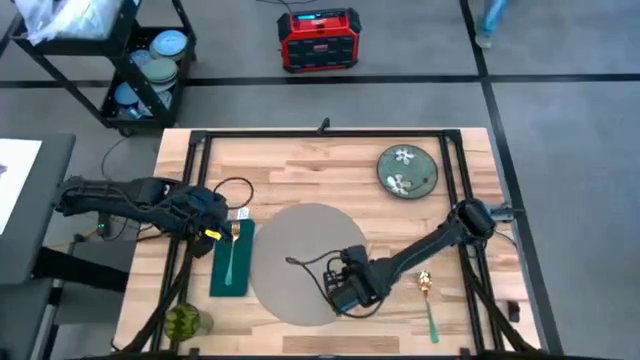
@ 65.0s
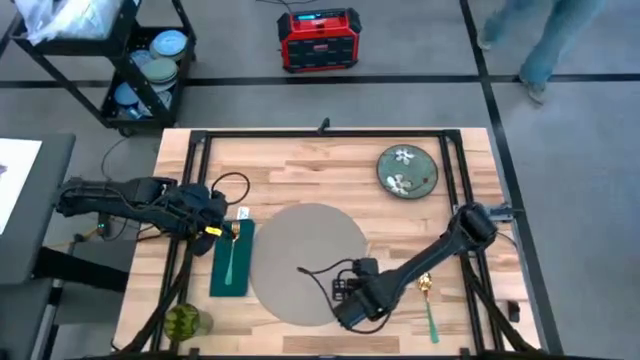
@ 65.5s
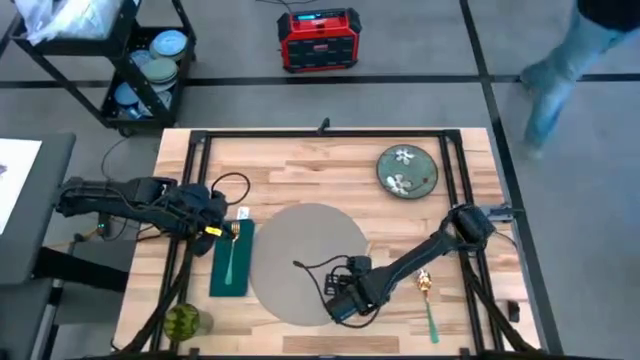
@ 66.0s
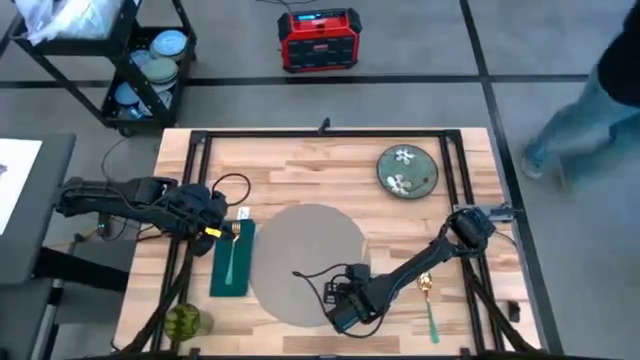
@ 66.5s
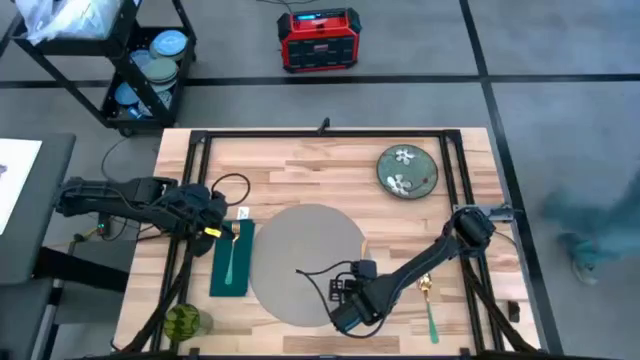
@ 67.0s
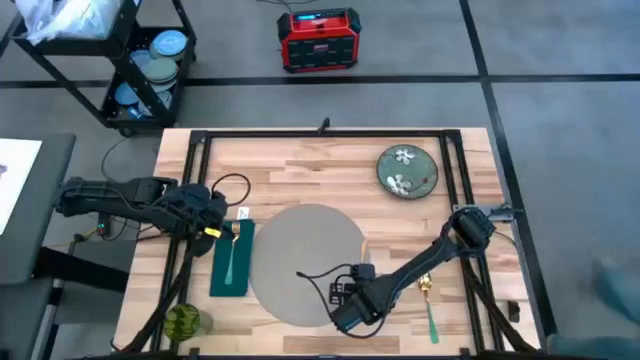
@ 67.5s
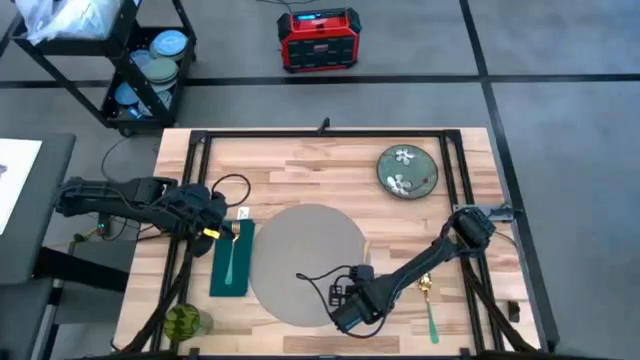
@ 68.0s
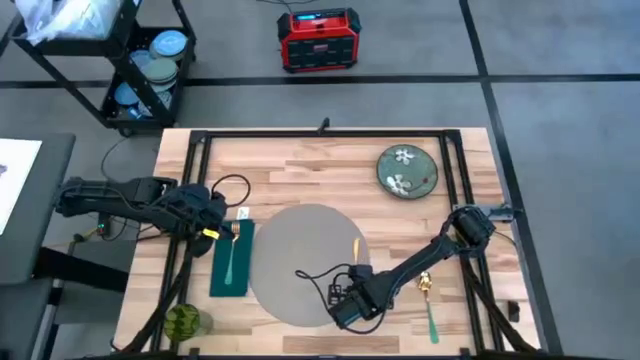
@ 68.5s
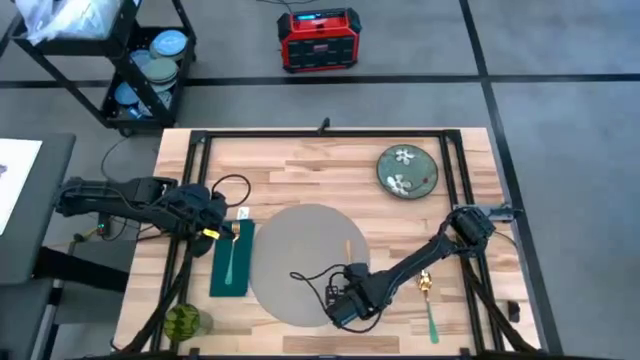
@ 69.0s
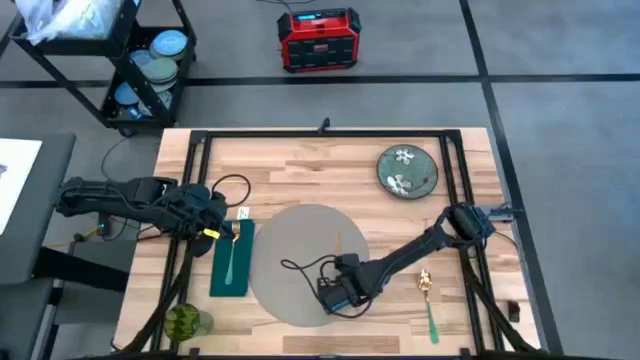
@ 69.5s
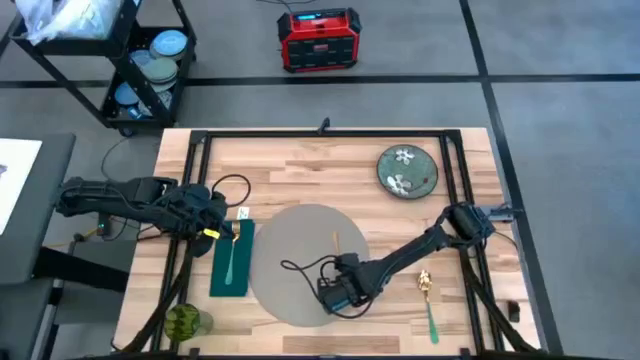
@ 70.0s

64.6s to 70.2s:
Task: Set table place
Put the gold table knife on the gray table placemat

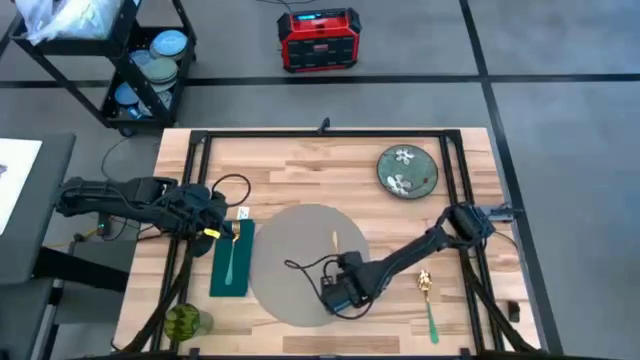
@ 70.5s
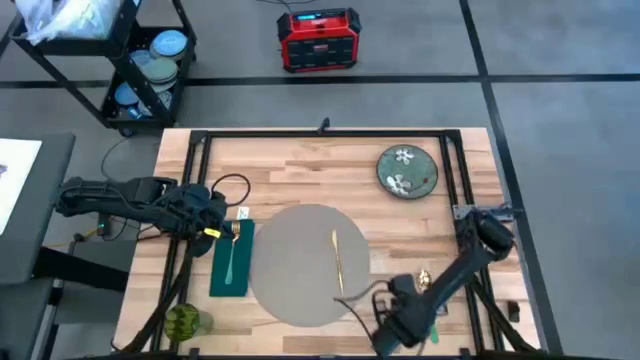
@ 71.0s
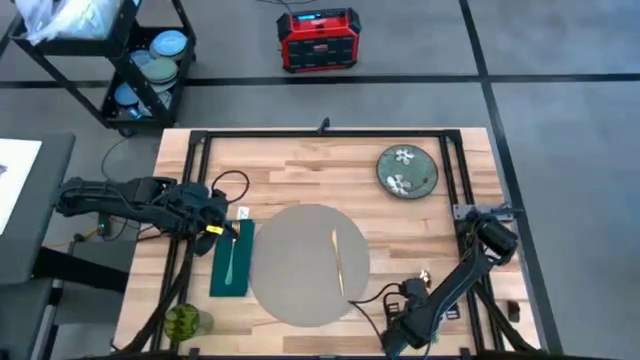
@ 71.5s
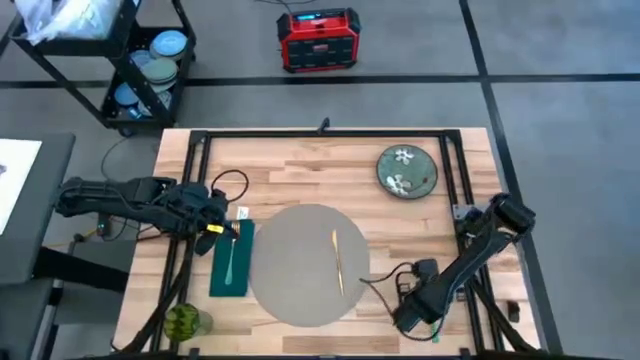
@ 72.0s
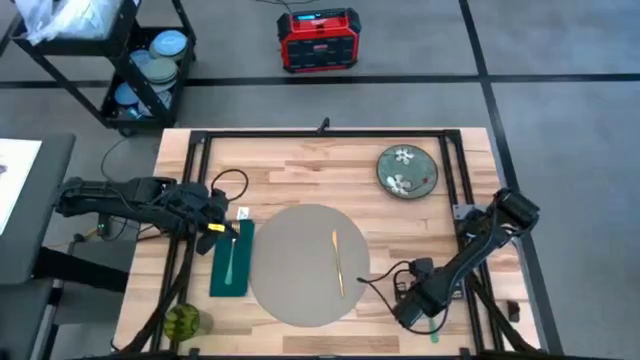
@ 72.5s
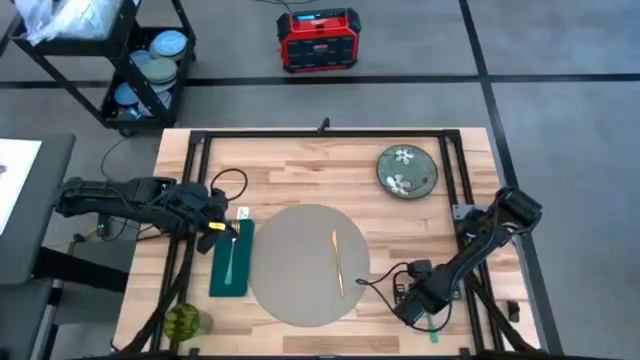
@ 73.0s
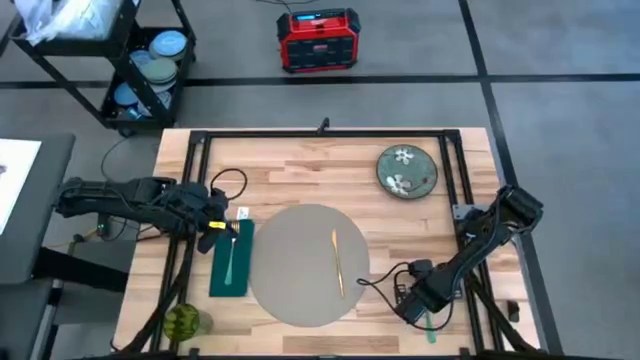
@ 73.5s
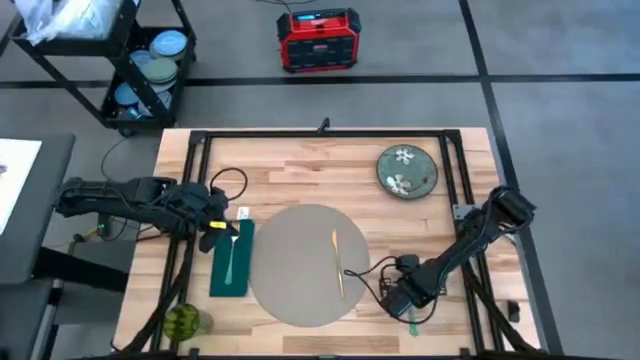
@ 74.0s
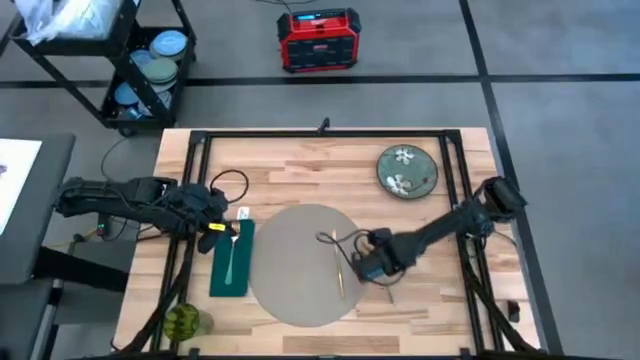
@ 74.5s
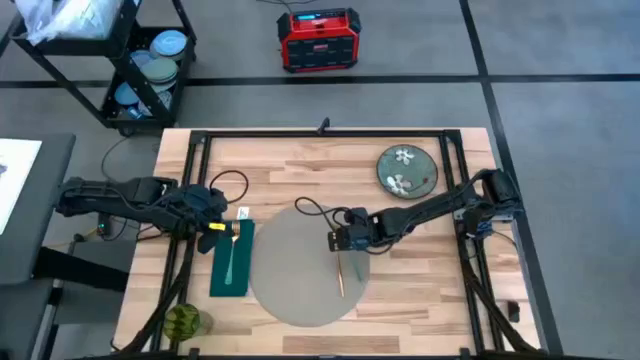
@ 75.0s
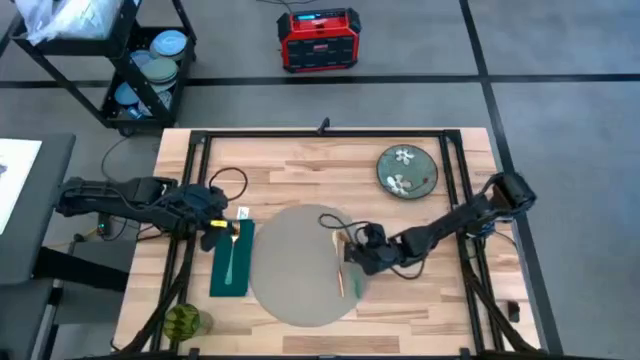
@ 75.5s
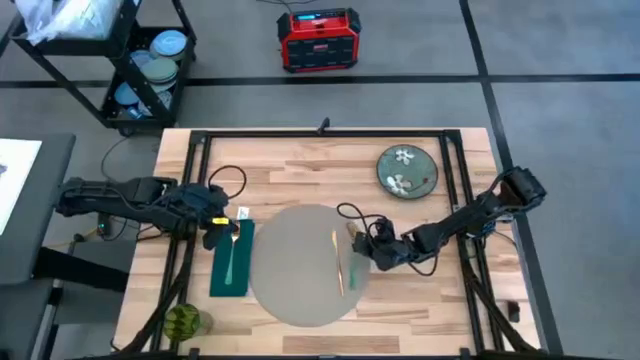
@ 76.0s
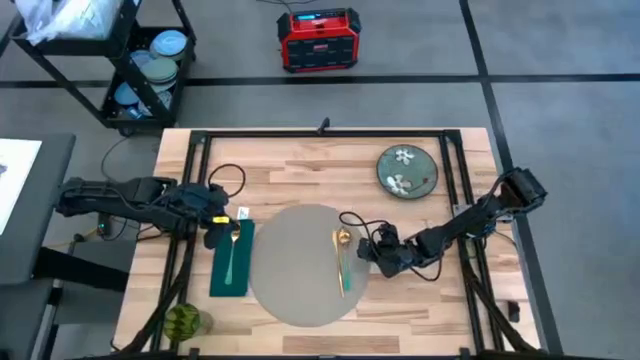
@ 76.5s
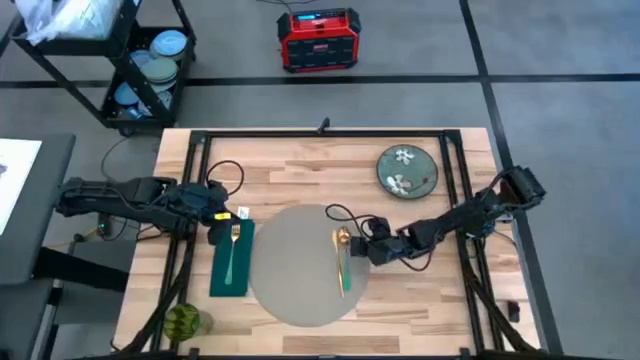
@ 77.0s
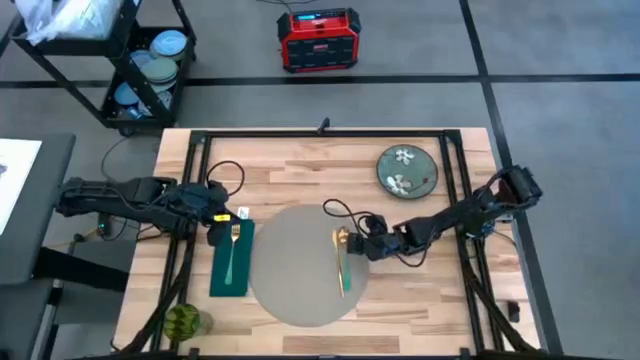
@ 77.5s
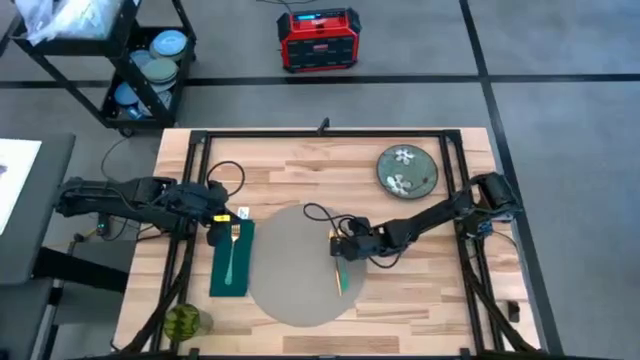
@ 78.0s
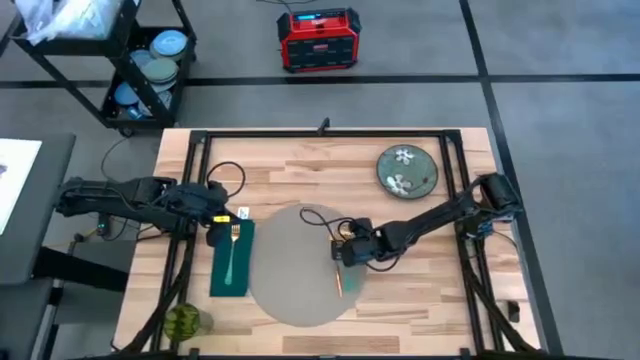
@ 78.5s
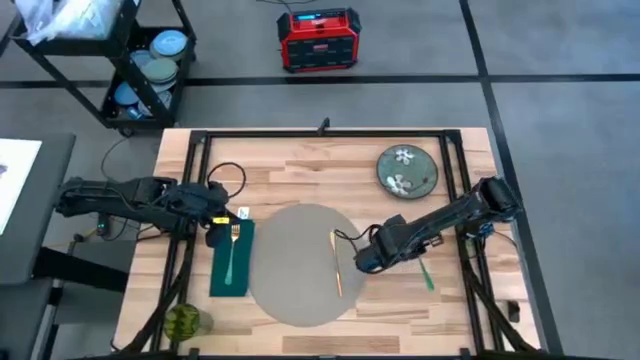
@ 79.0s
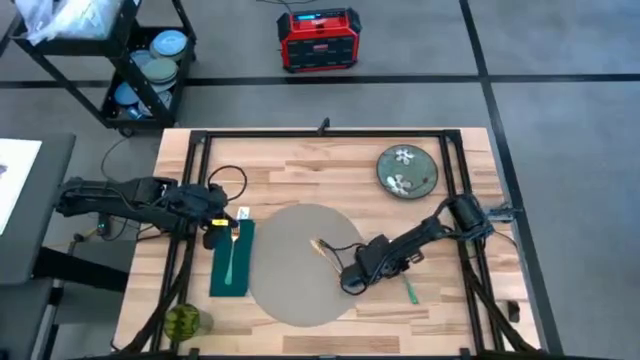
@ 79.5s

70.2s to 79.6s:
Put the green spoon beside the table knife on the gray table placemat

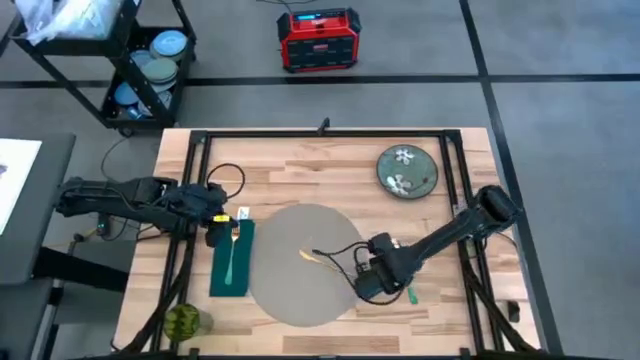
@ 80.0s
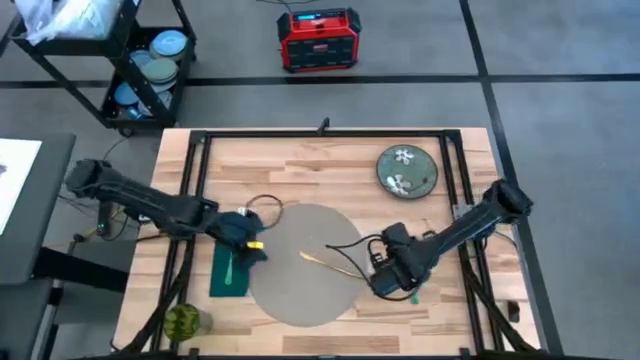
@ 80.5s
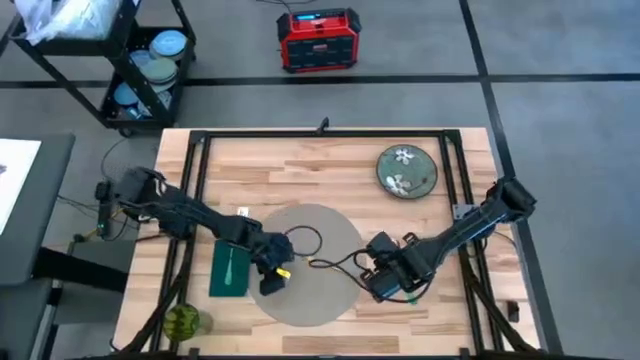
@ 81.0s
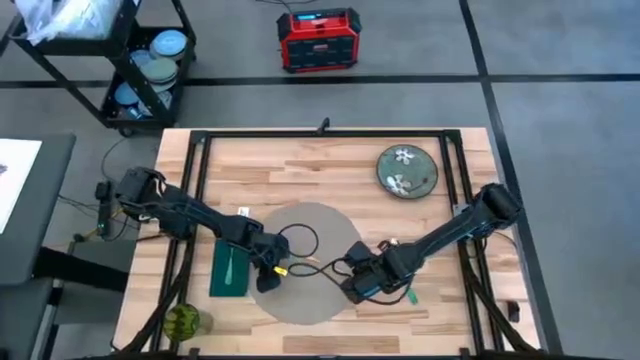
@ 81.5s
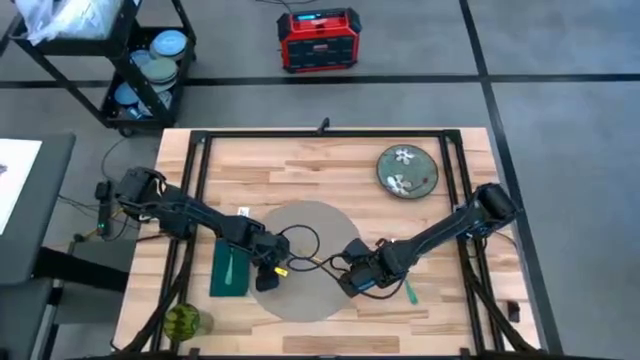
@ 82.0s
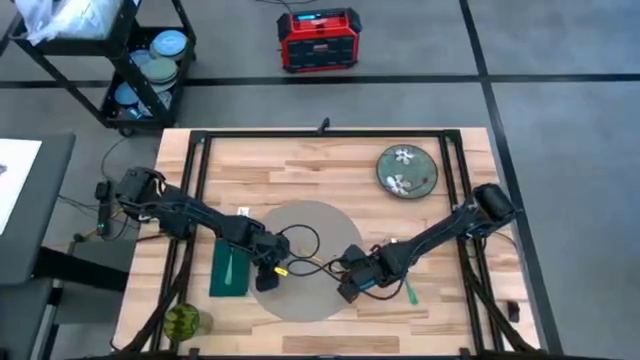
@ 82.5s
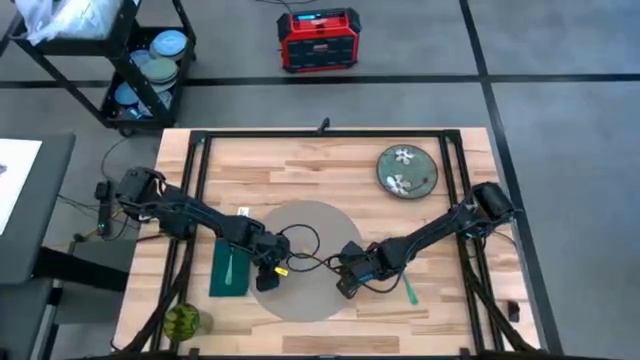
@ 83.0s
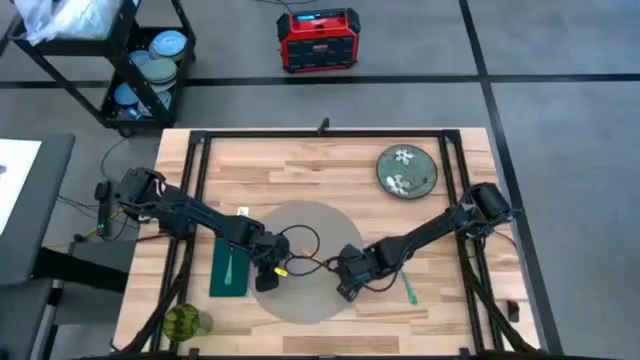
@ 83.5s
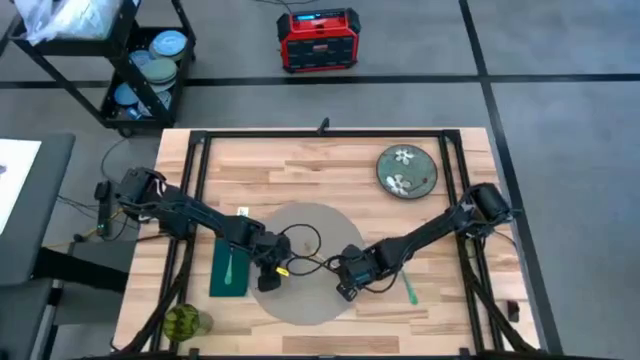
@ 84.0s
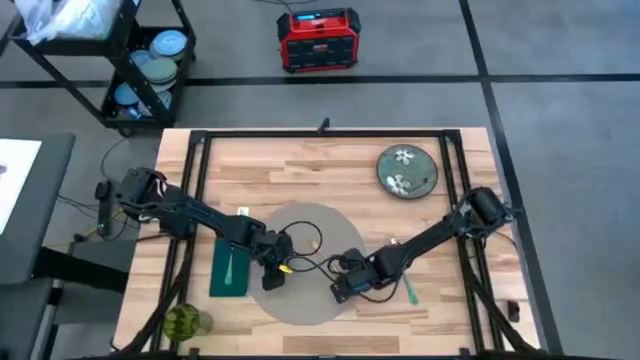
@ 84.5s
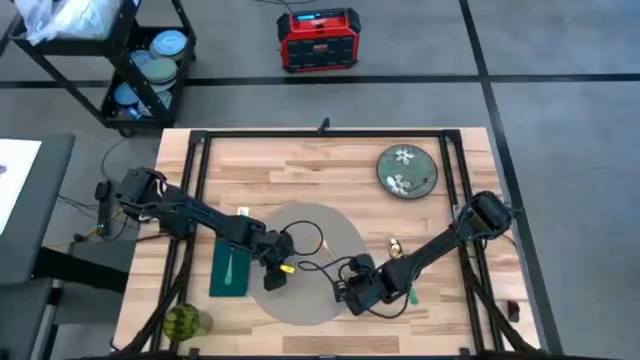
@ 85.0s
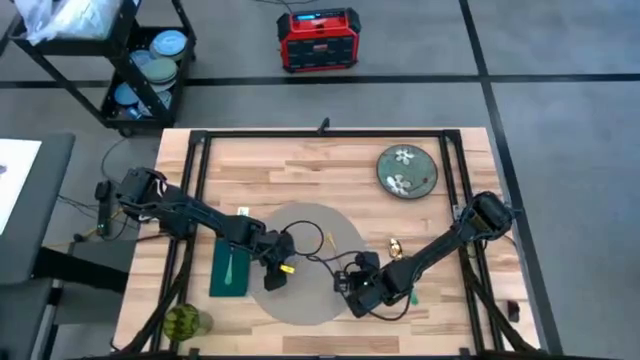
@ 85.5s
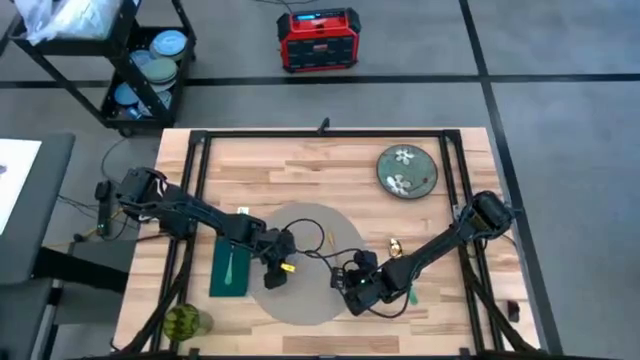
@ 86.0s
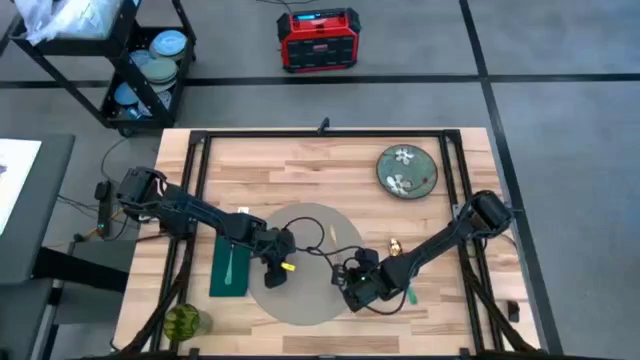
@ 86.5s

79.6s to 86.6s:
Adjust the gold table knife on the gray table placemat
